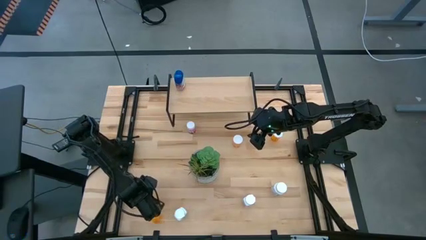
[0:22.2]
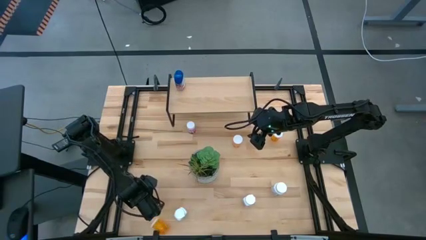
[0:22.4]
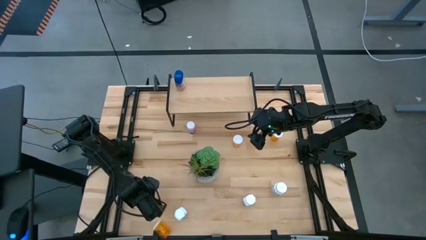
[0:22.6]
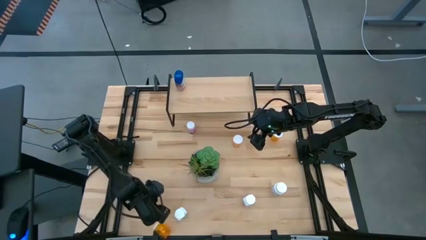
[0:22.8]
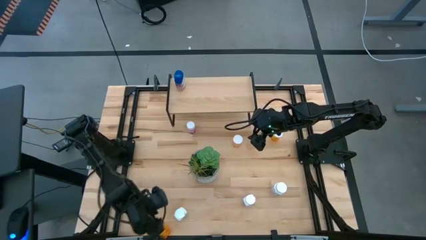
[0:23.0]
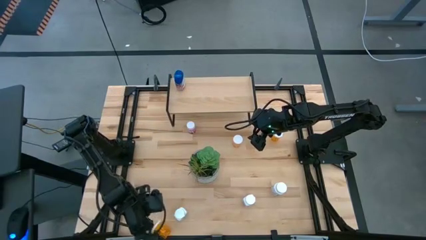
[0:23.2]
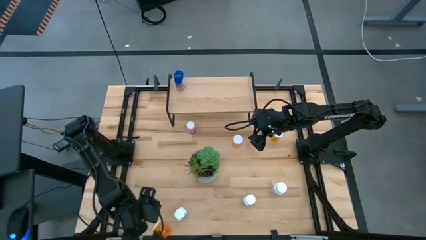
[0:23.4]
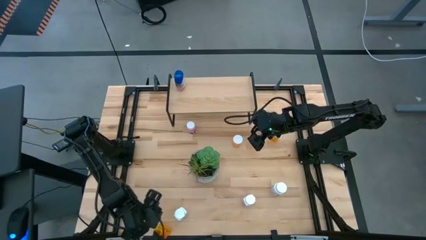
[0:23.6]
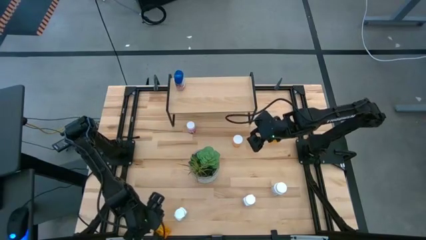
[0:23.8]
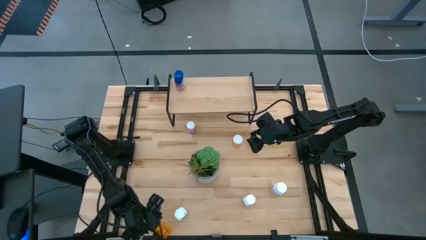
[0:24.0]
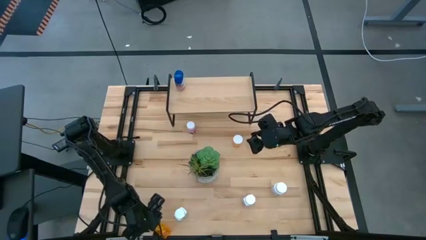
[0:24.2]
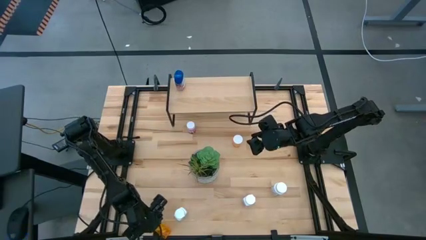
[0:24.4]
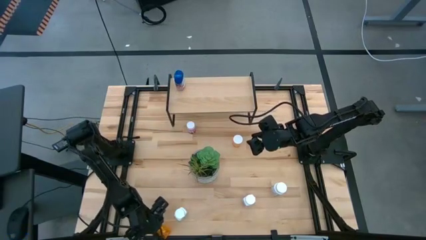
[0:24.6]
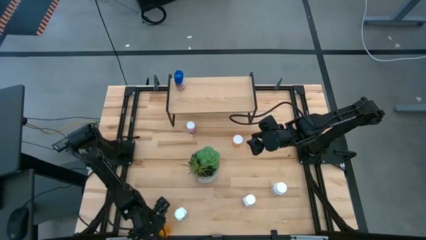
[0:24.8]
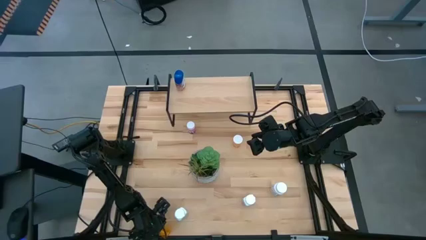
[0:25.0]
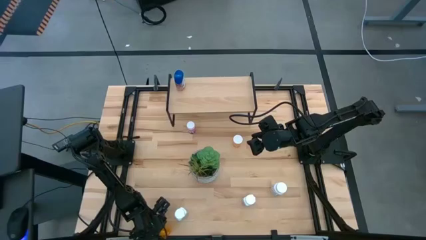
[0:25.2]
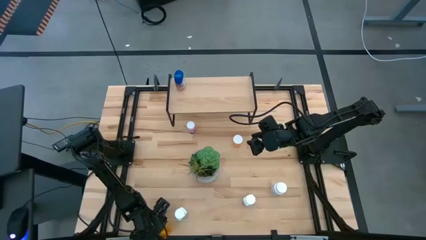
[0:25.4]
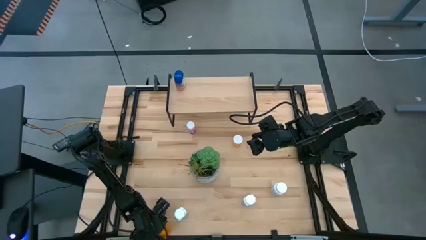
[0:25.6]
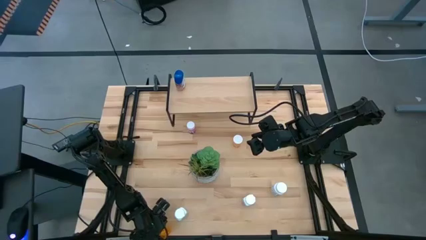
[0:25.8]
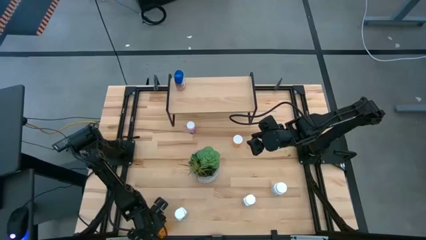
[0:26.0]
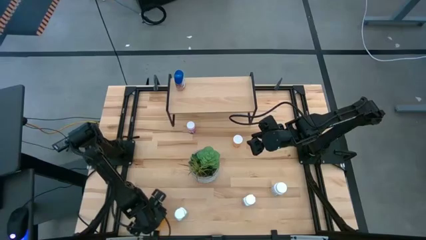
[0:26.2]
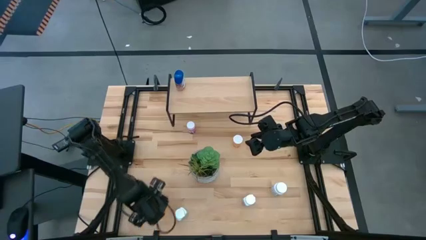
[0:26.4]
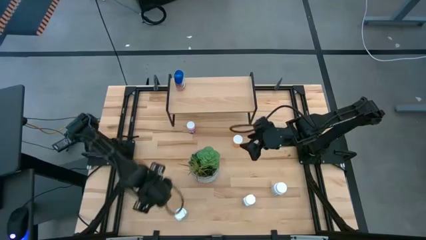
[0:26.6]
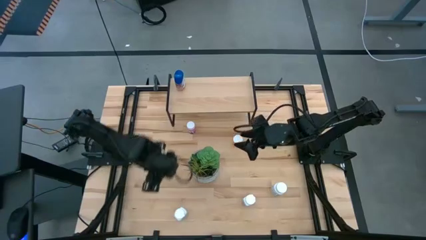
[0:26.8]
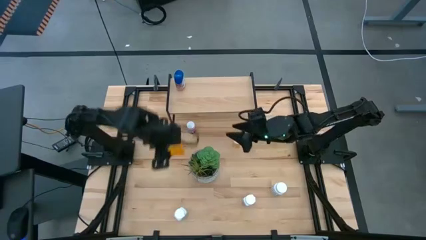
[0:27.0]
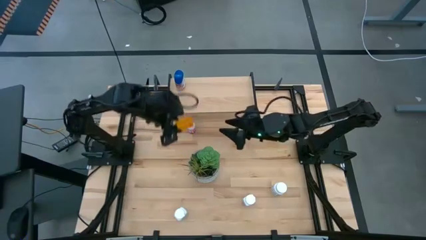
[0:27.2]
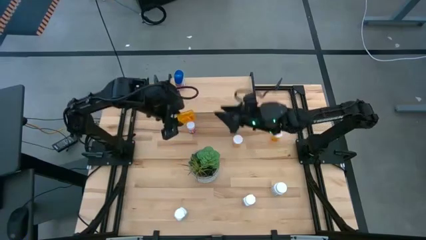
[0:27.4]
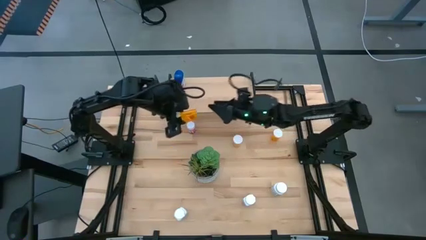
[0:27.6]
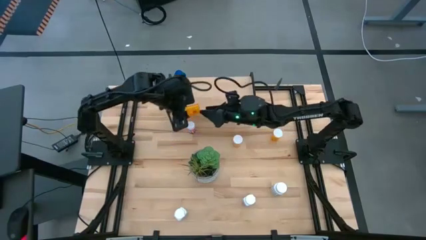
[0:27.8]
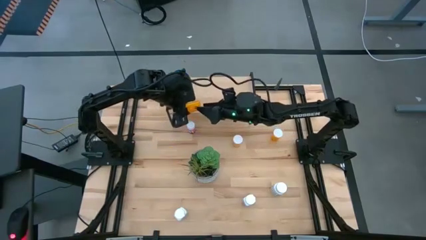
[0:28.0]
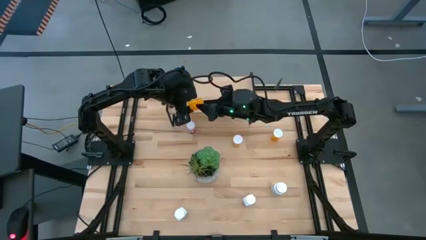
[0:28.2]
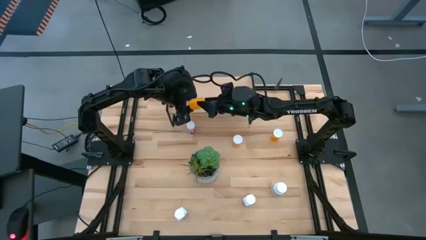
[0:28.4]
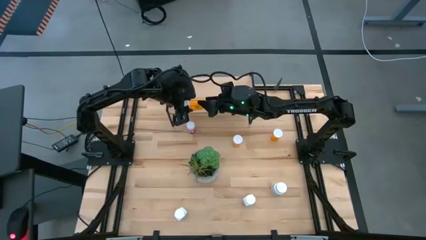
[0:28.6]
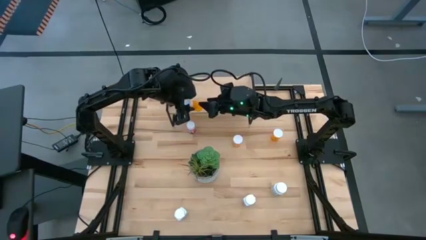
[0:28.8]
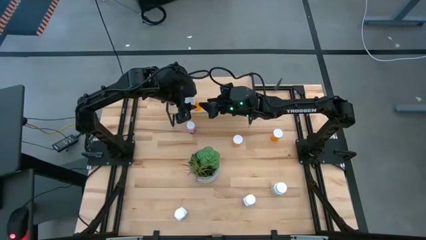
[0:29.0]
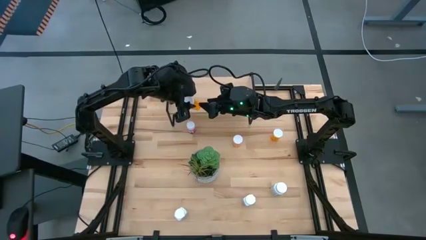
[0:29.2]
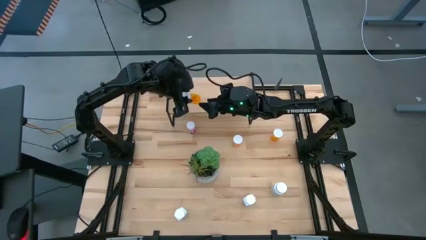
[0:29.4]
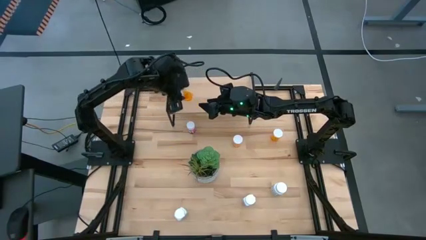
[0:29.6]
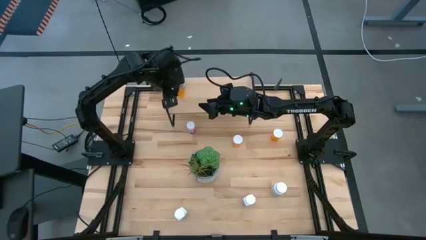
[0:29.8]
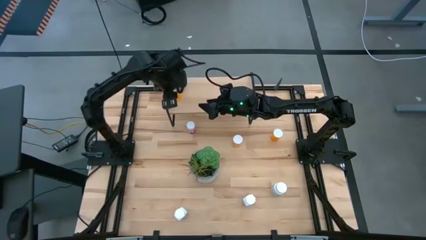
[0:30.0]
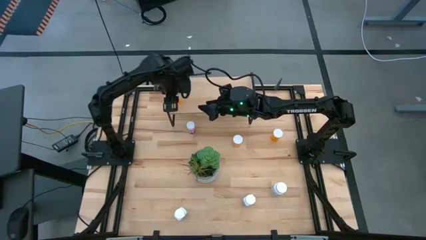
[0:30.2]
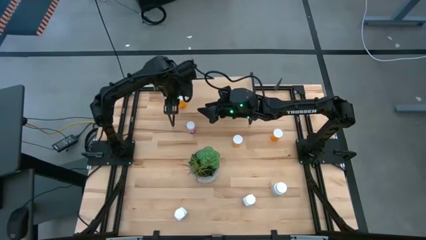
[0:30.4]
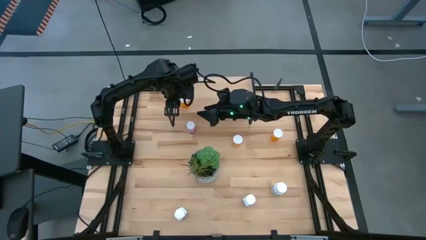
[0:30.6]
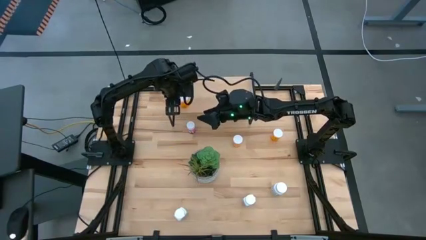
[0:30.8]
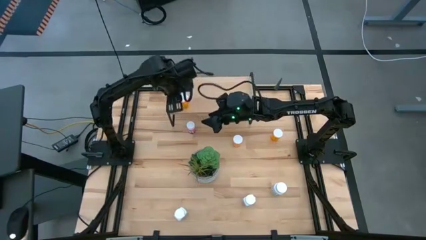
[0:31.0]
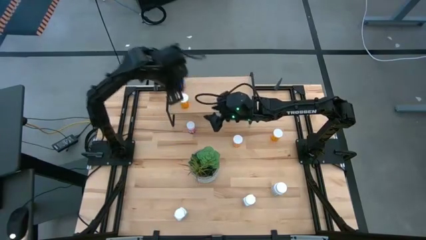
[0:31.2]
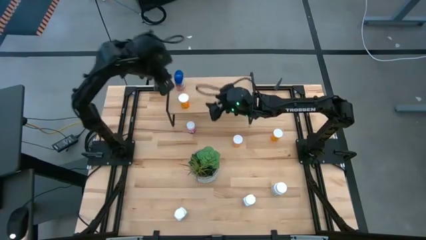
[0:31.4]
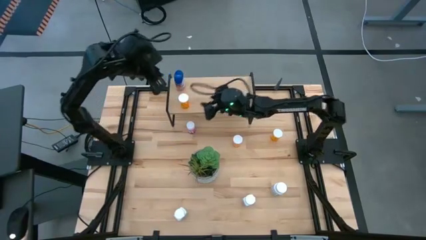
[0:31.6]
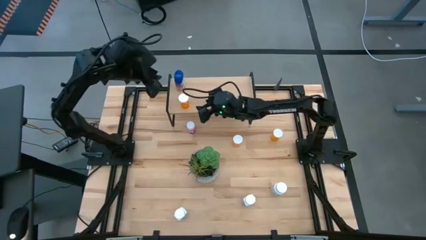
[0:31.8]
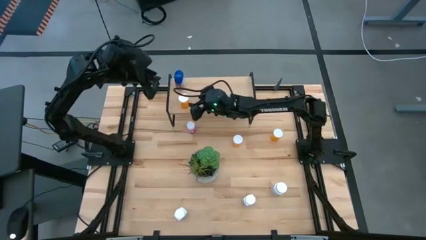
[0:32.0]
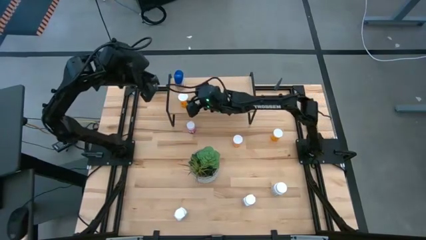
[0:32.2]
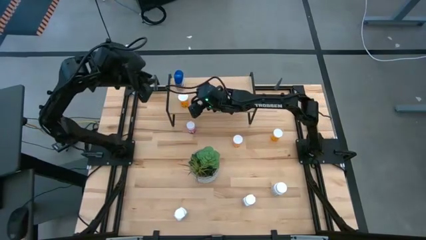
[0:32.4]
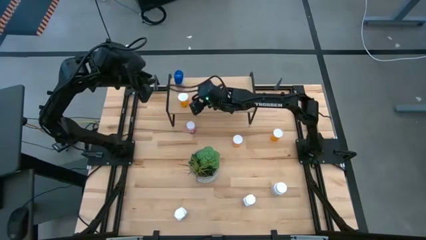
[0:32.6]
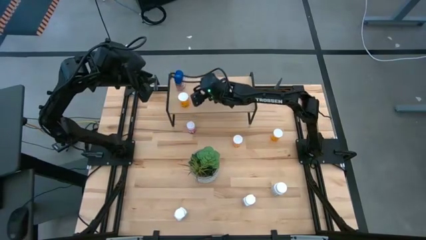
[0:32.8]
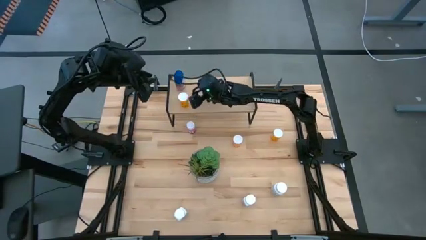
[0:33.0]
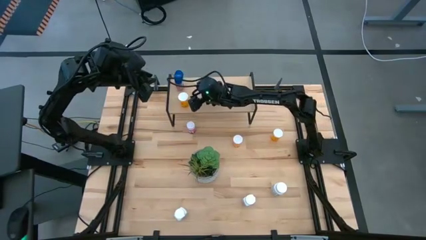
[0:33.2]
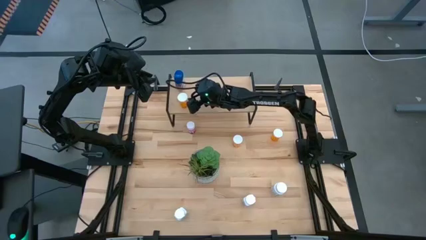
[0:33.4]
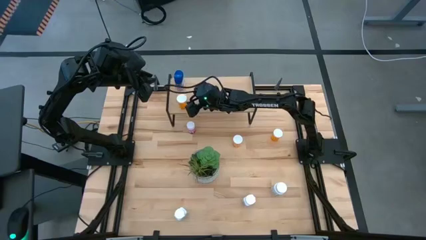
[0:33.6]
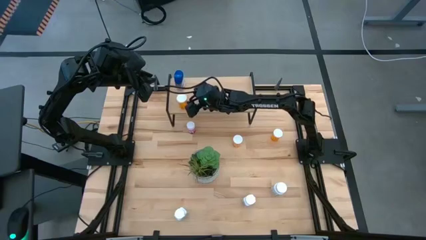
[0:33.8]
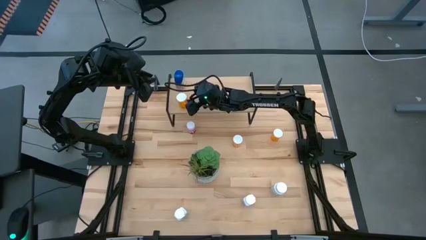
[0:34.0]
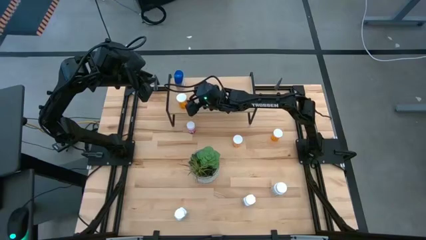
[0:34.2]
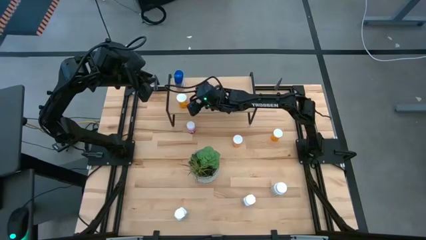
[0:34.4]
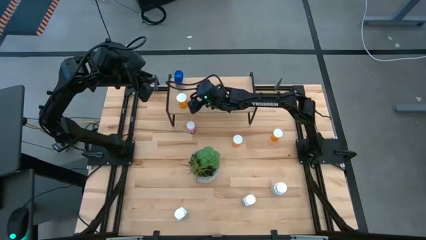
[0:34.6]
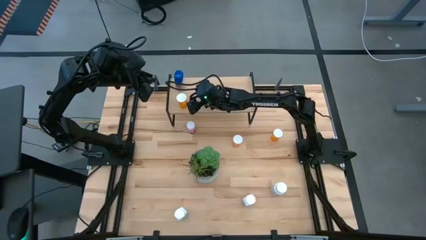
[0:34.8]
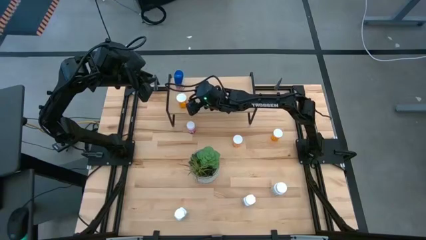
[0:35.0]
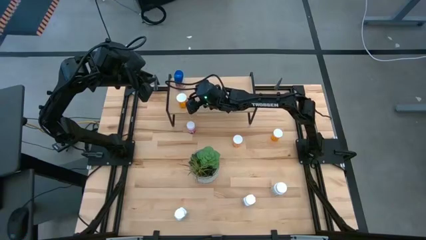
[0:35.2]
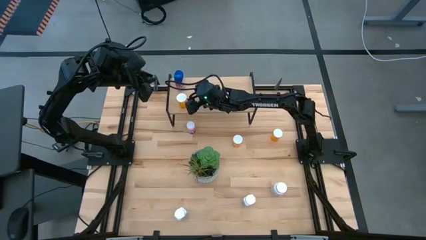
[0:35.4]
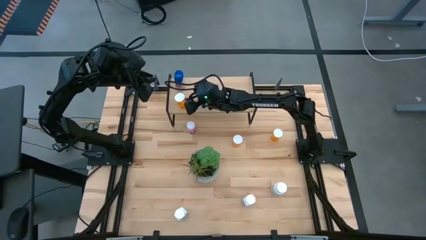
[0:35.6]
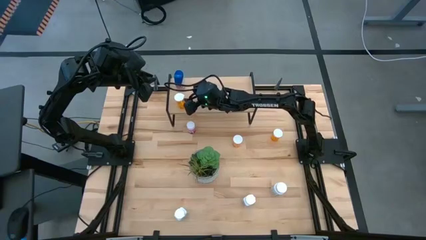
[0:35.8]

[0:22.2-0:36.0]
Task: Pick and place medicine bottles onto shelf by color
Put the bottom orange pill bottle on the shelf
